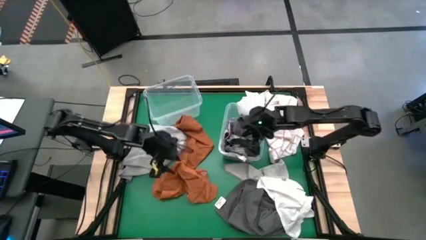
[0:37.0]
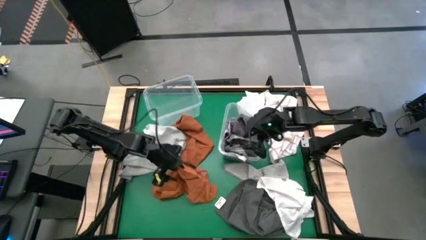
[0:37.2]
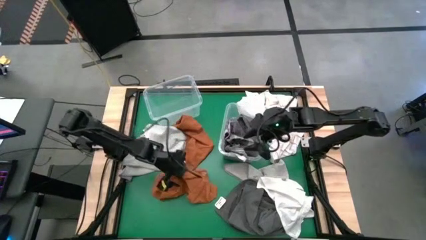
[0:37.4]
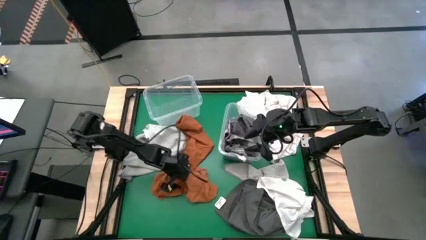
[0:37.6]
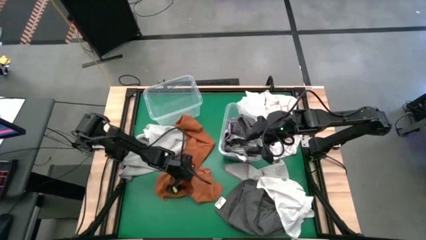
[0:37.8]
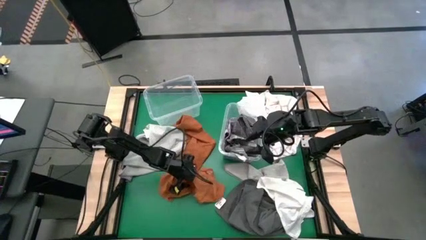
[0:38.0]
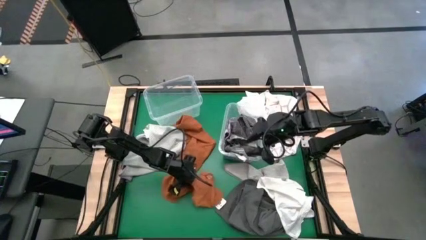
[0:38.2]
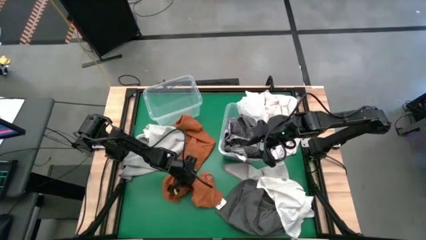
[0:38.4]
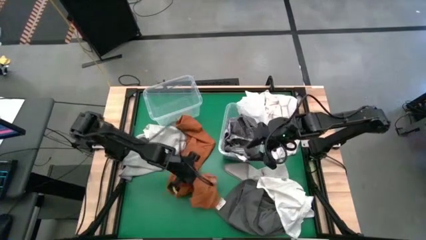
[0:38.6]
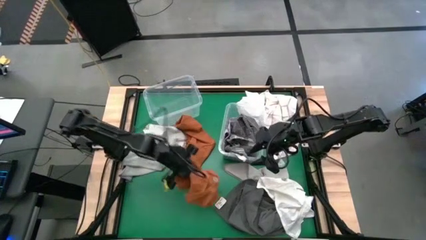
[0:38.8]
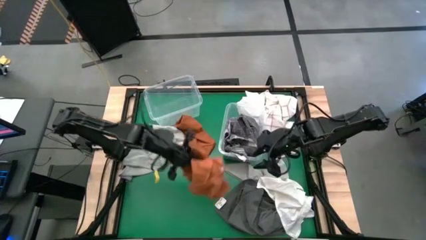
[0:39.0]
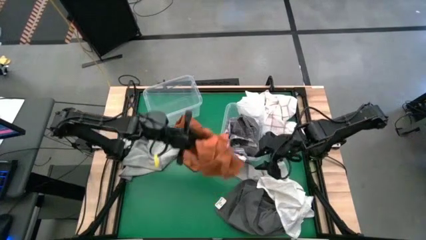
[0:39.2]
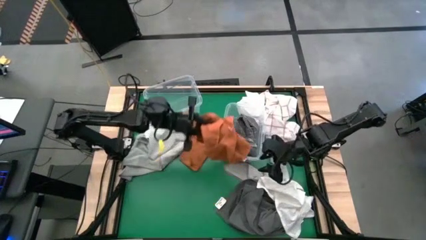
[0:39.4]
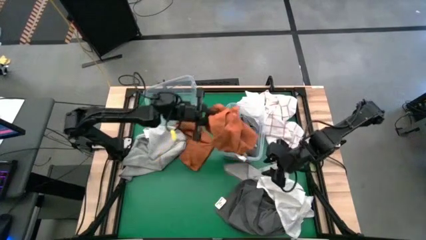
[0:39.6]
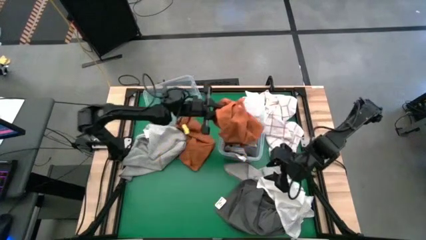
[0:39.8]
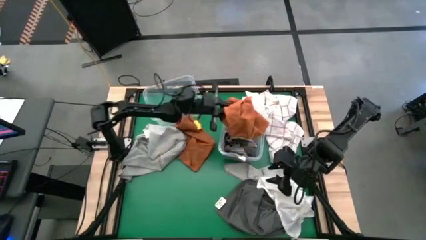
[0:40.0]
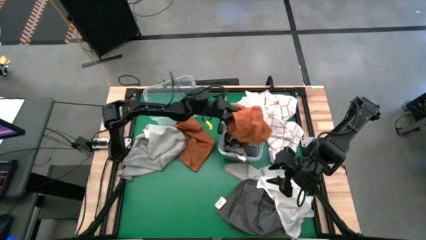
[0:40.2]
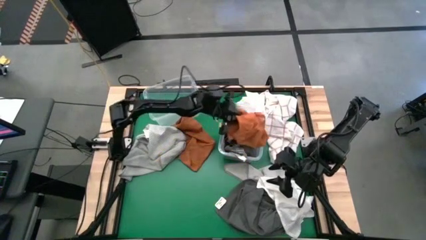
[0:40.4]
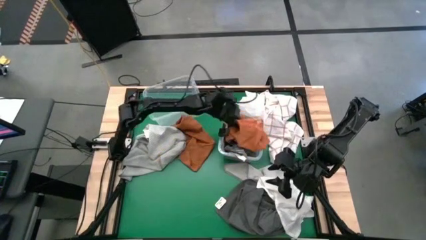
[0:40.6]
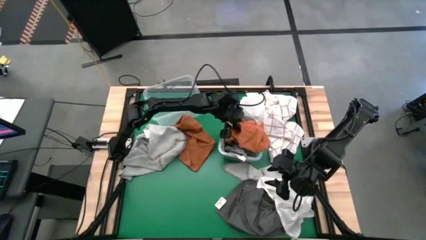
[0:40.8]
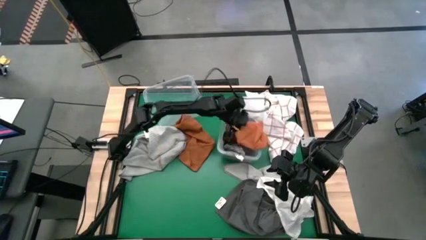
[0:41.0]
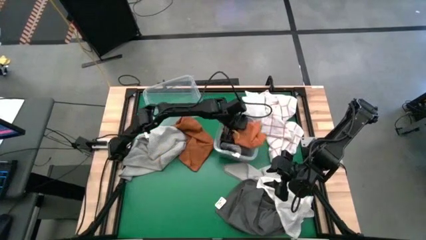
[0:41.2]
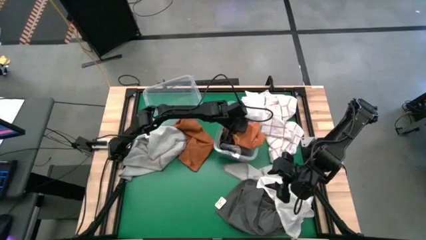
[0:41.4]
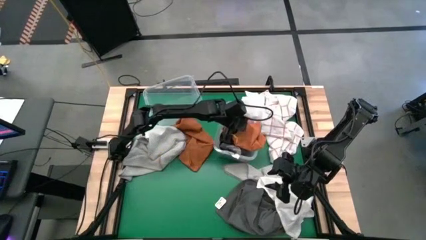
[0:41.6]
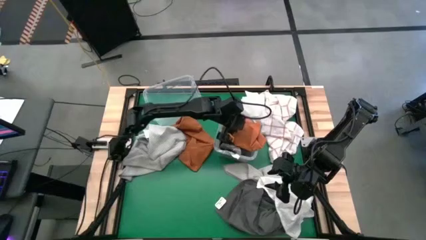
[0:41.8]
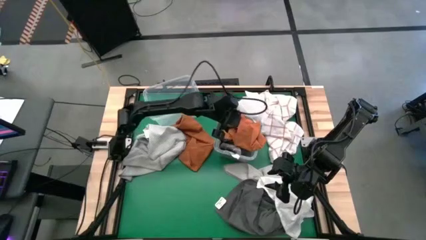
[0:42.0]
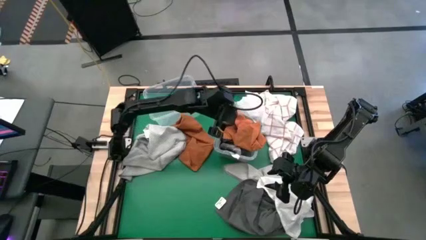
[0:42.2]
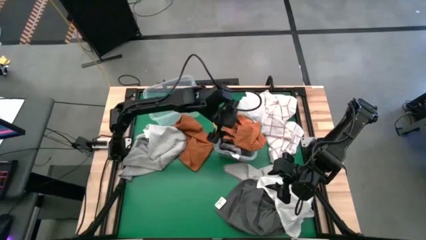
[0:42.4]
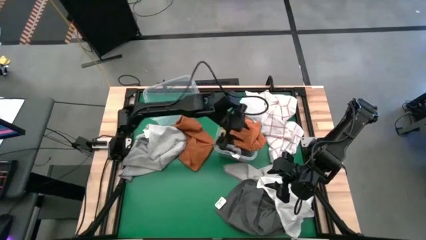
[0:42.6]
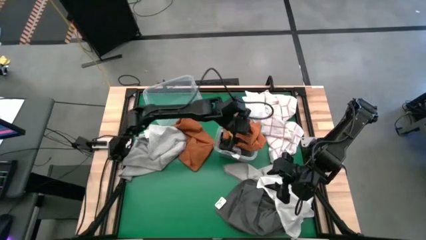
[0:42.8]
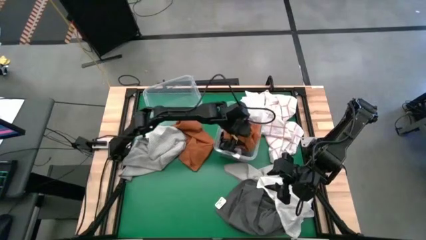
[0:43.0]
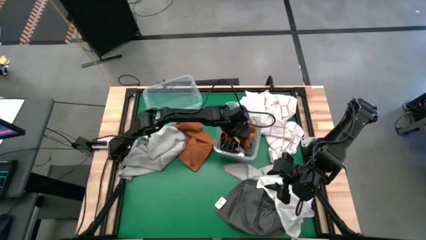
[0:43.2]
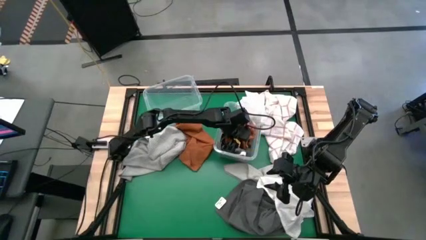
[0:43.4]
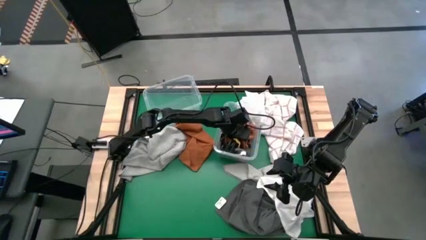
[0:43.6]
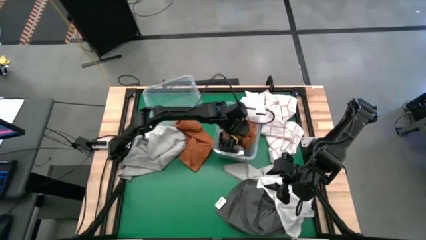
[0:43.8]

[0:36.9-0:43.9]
Task: Sort towels by color in basket
Put the bottom orange towel into the right transparent bin

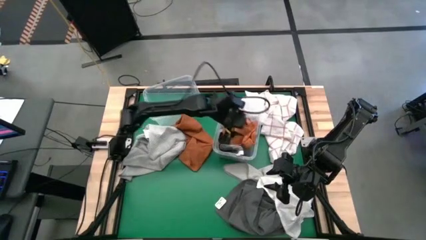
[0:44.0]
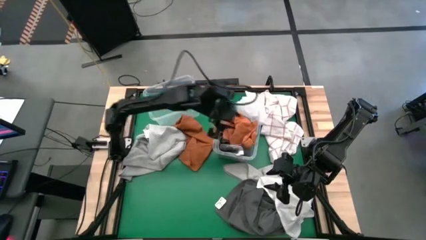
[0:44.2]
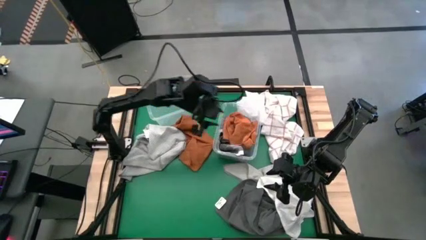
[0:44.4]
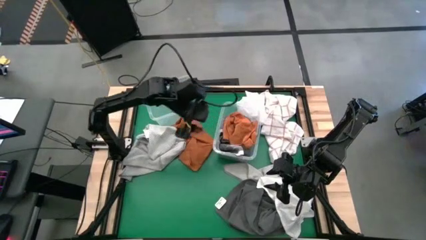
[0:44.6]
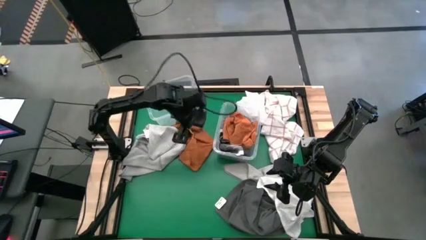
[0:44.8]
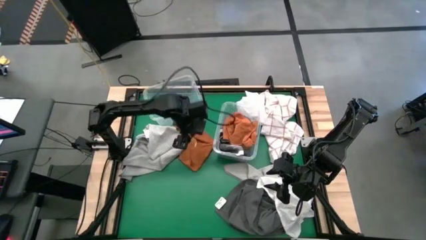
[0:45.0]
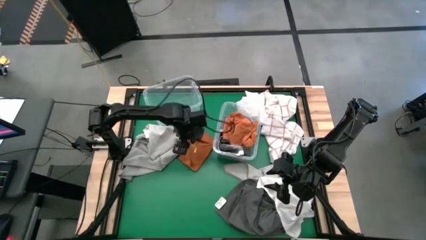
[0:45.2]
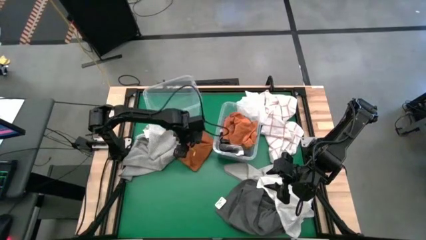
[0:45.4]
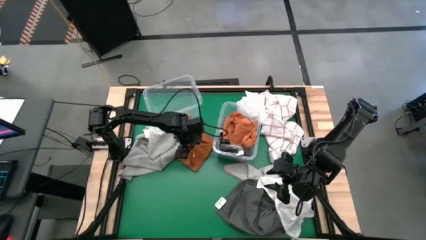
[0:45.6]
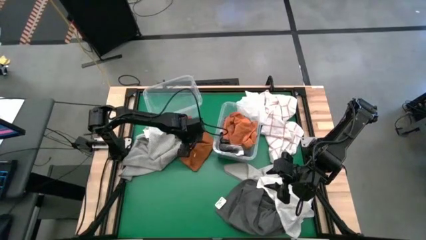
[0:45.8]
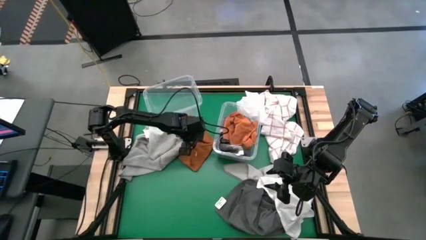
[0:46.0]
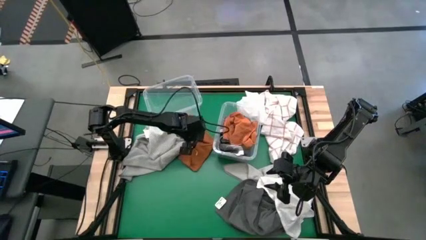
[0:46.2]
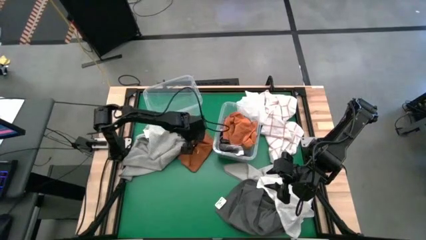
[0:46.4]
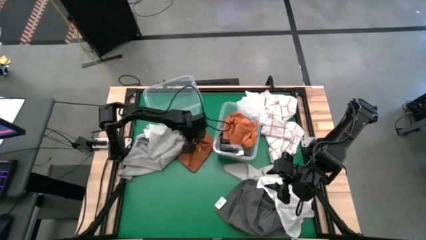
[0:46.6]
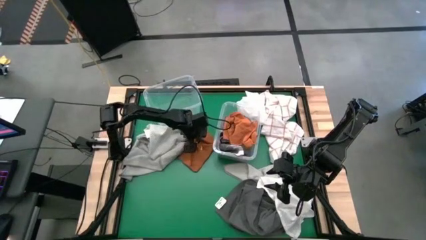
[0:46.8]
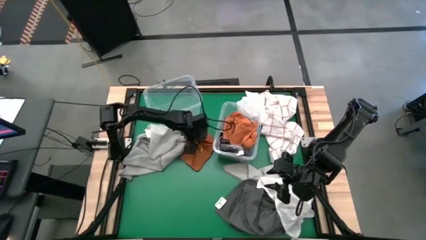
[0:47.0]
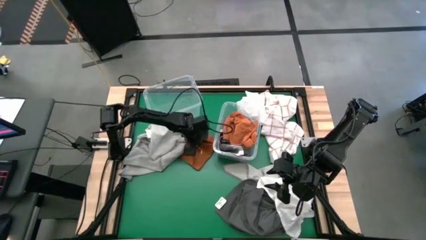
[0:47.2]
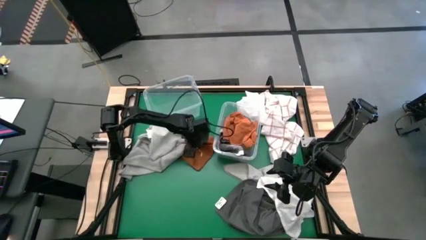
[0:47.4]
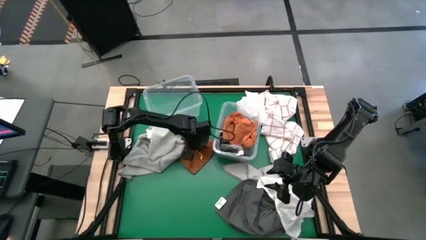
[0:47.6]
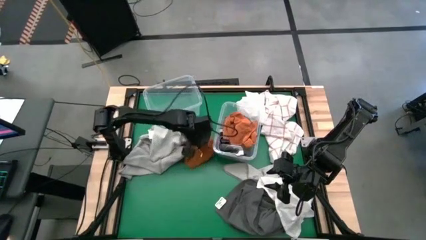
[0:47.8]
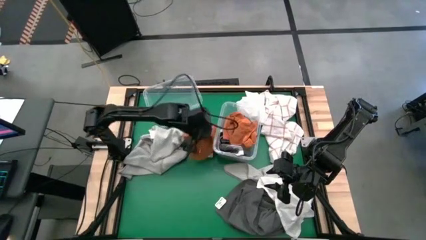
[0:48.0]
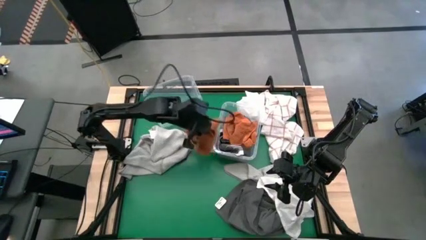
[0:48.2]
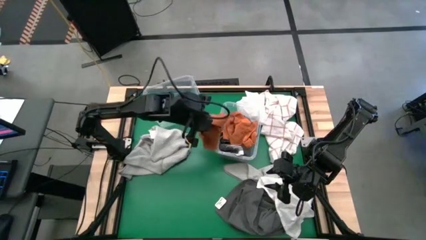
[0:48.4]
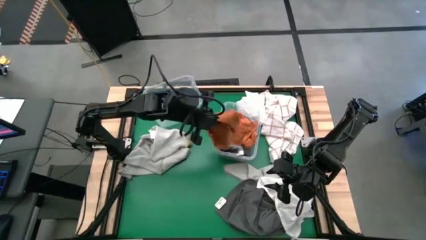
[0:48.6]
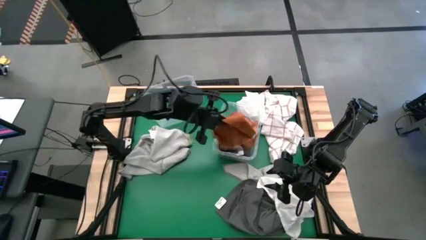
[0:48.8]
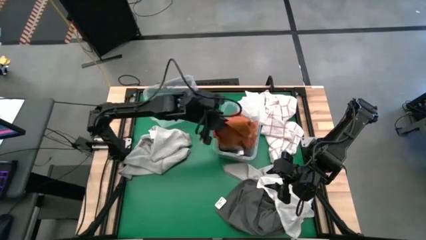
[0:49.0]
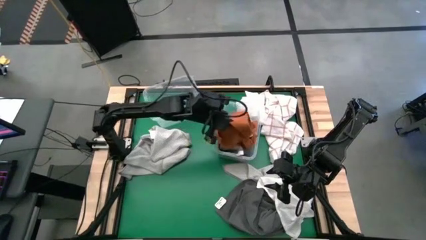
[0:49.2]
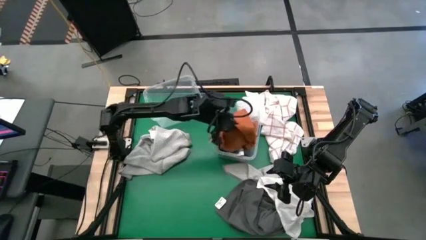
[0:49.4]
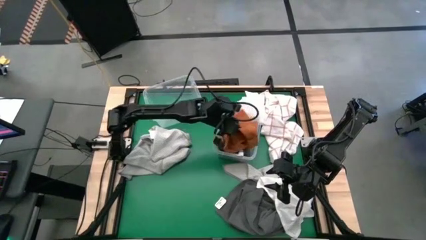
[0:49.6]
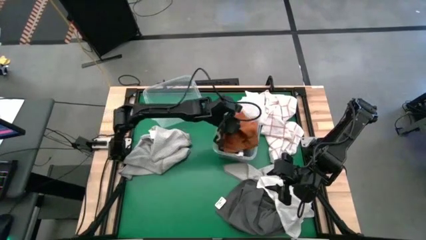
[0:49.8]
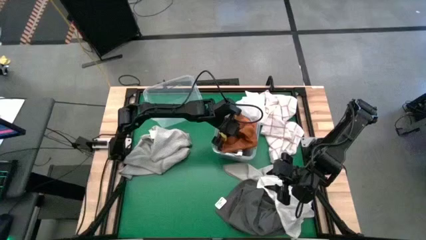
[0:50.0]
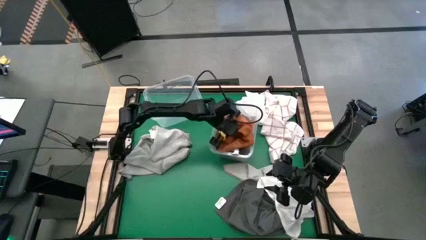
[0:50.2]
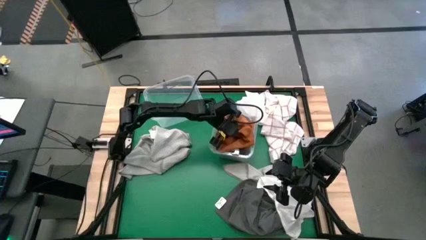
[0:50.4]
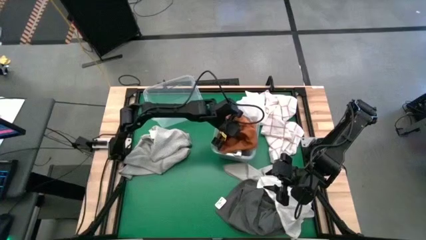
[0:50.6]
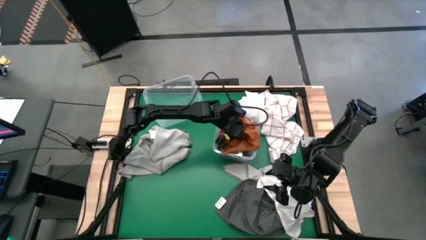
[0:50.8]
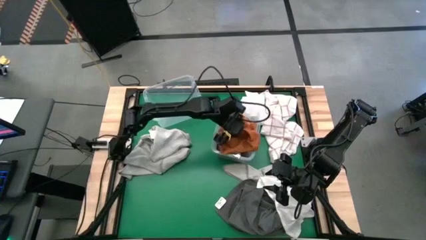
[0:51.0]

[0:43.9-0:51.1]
Put the orange towel into the right transparent bin

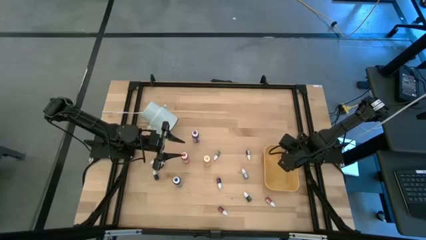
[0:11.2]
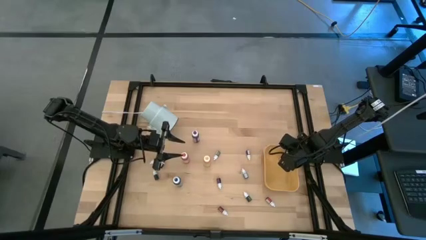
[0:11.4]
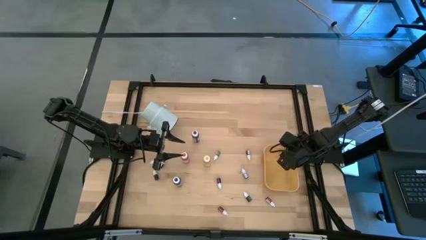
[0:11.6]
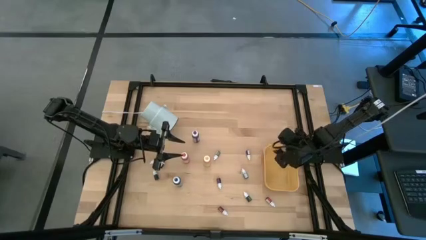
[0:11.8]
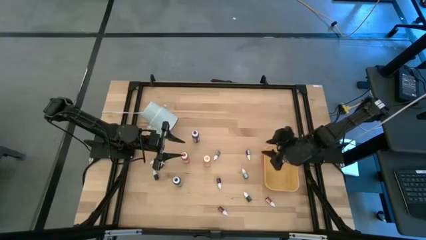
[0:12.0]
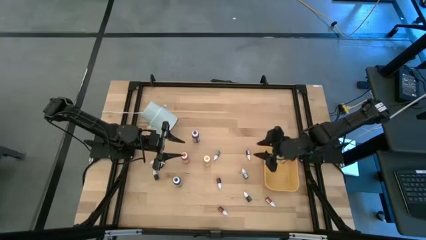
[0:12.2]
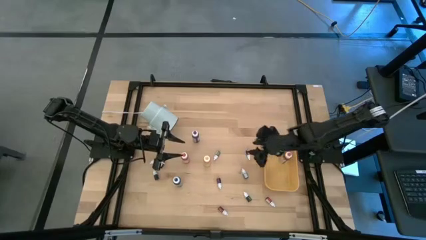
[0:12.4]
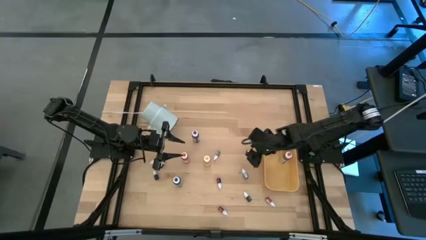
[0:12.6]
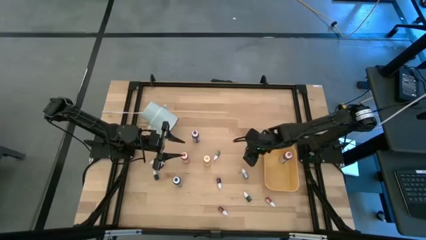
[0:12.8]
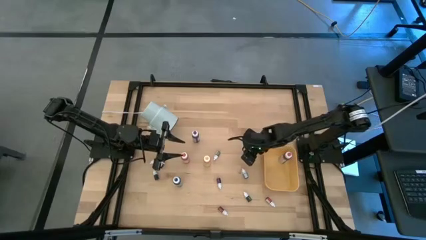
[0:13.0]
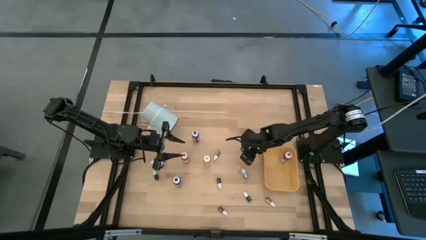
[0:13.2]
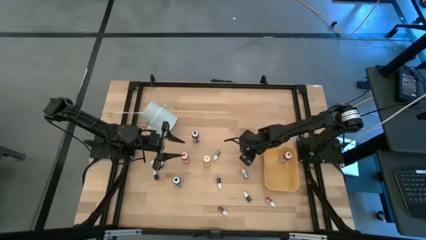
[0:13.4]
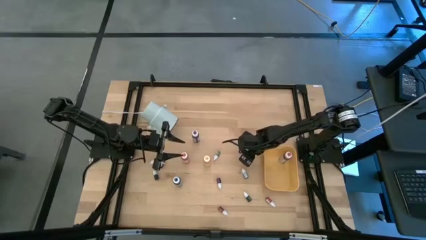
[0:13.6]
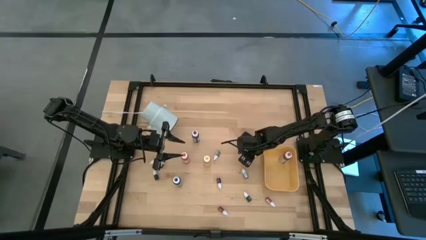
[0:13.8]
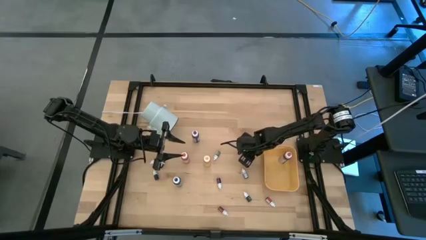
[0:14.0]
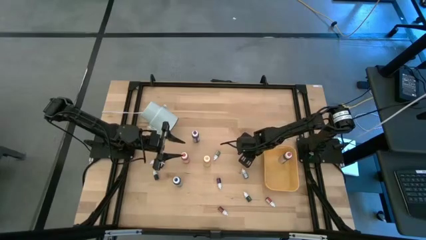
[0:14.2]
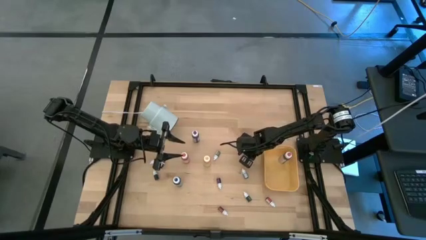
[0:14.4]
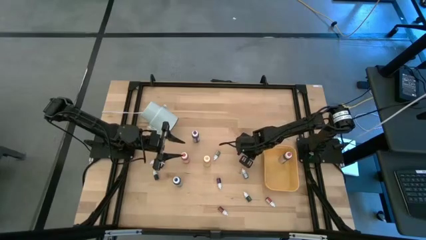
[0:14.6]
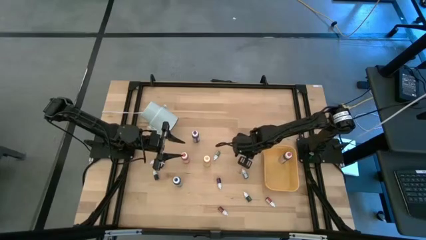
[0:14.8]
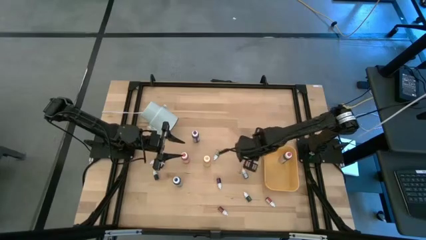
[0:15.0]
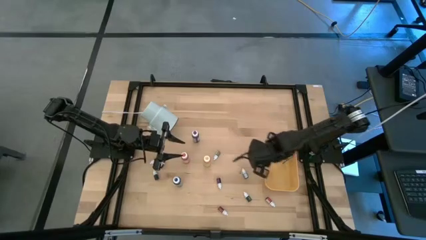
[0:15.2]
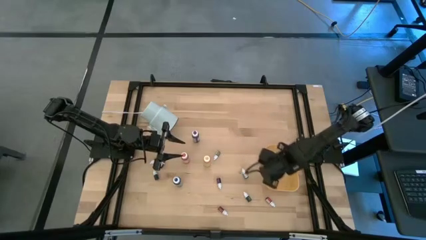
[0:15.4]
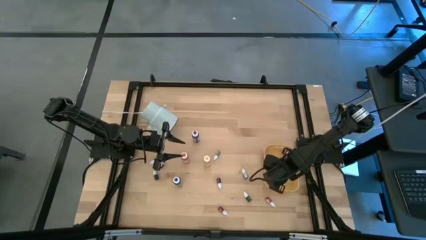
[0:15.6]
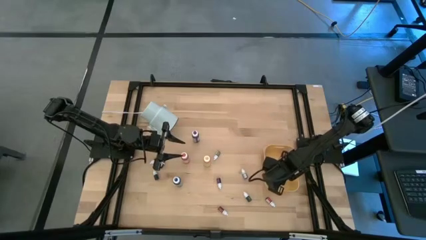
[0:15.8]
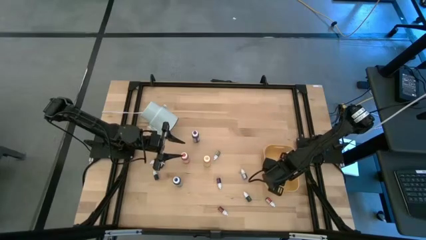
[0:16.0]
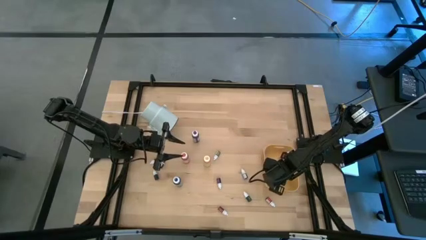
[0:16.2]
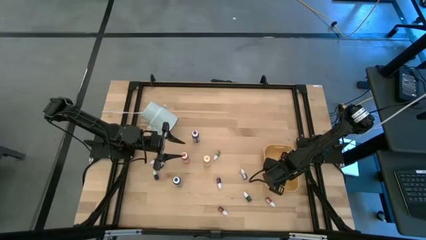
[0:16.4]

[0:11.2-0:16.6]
Task: Pick & Place food coloring
Put the right small pink food coloring bottle into the yellow bin
